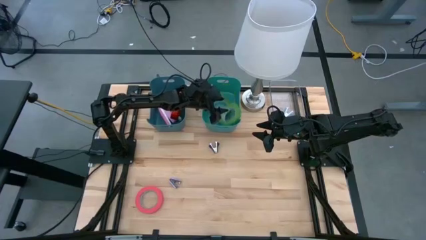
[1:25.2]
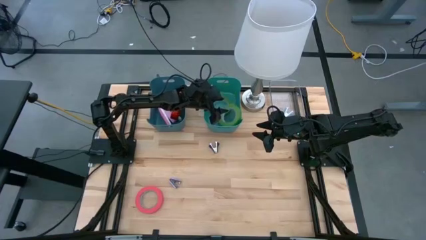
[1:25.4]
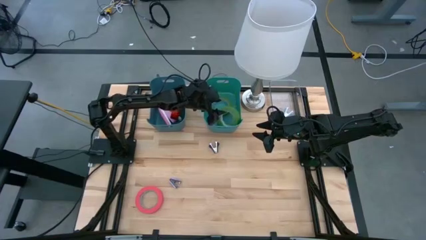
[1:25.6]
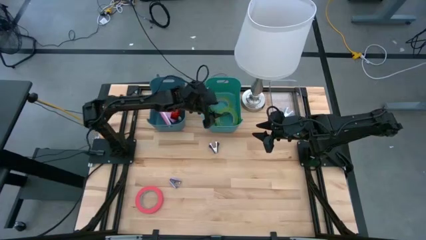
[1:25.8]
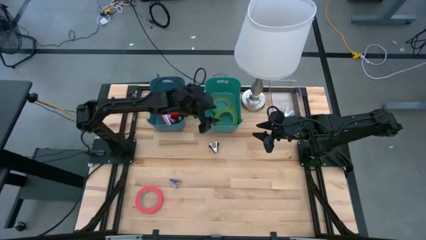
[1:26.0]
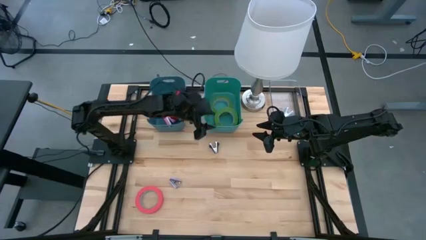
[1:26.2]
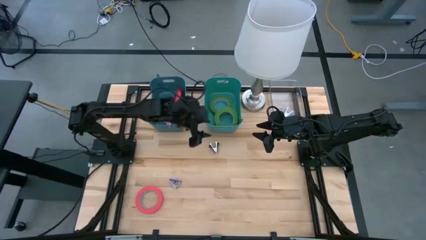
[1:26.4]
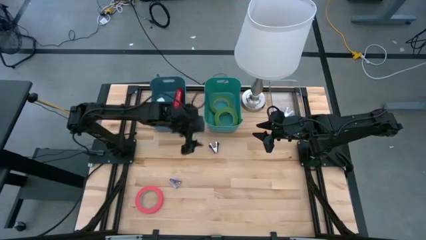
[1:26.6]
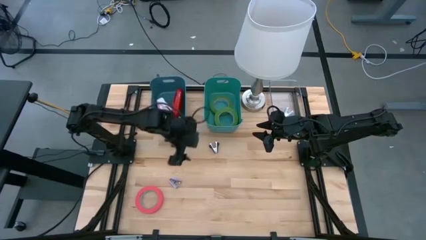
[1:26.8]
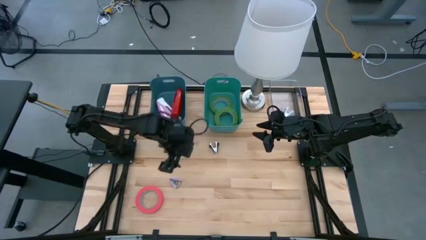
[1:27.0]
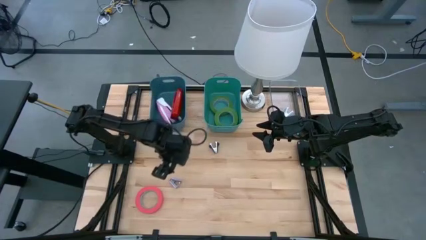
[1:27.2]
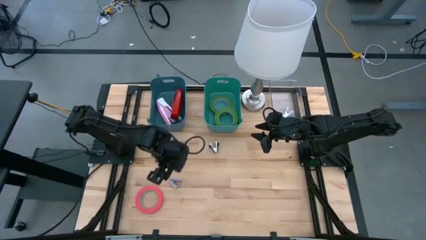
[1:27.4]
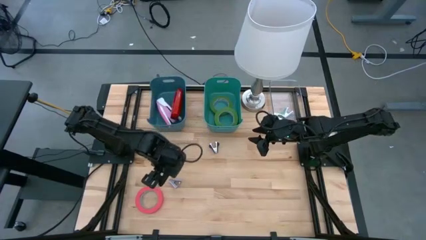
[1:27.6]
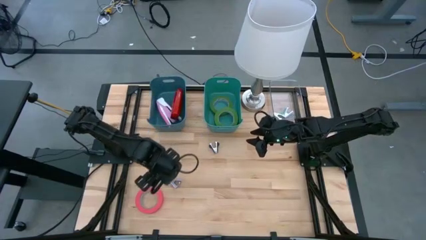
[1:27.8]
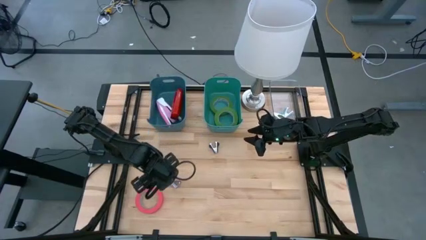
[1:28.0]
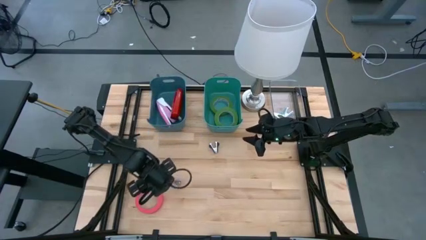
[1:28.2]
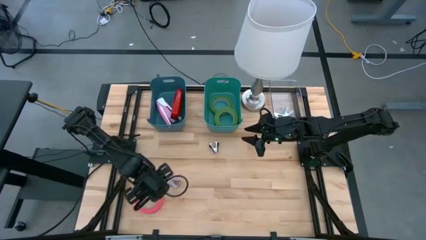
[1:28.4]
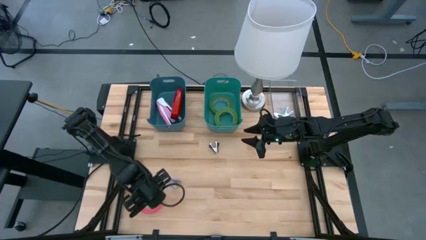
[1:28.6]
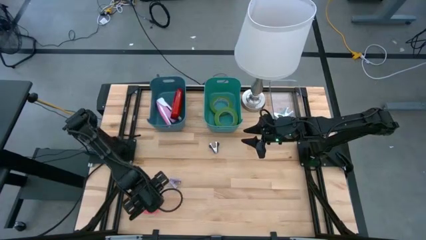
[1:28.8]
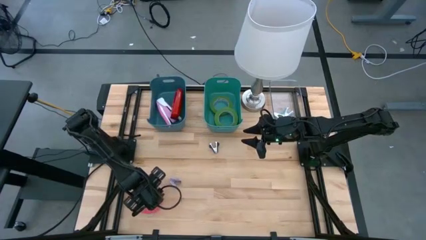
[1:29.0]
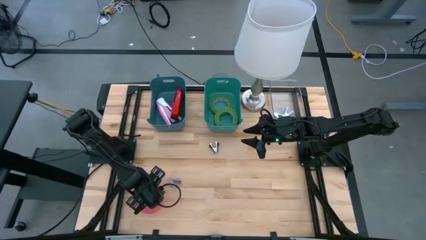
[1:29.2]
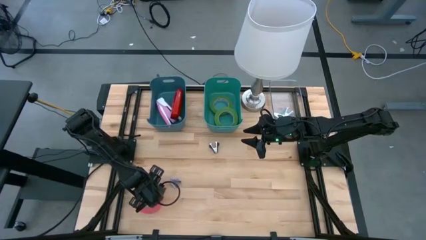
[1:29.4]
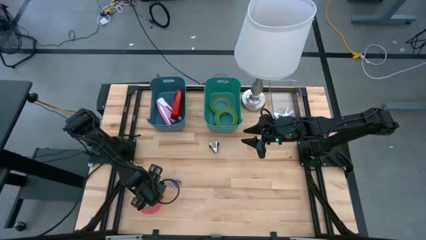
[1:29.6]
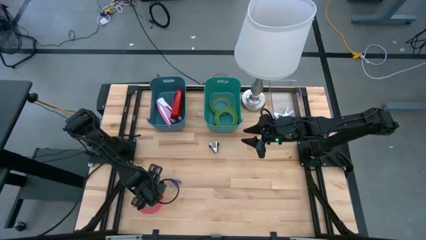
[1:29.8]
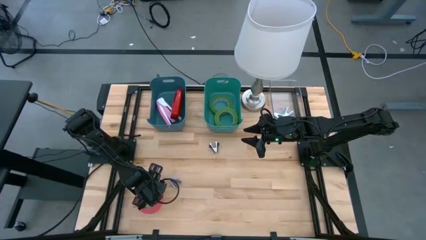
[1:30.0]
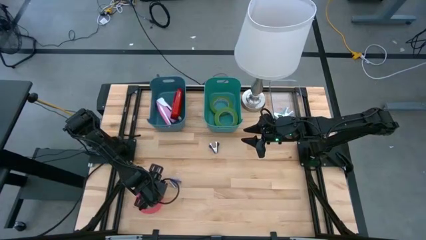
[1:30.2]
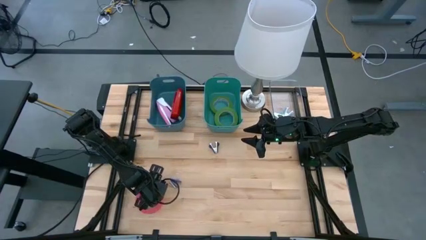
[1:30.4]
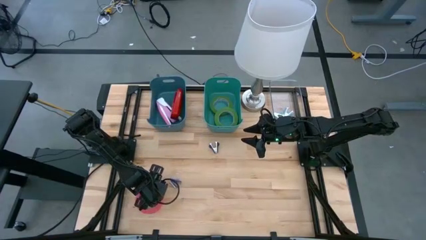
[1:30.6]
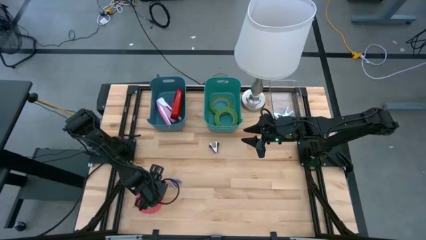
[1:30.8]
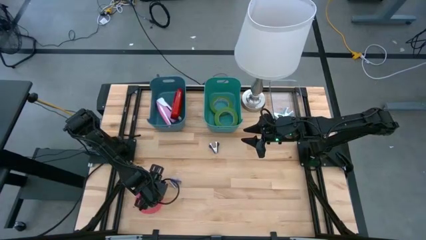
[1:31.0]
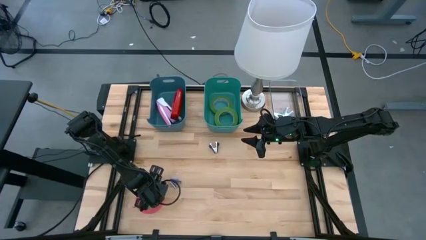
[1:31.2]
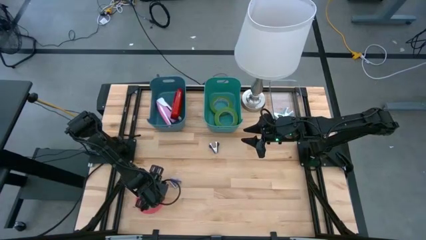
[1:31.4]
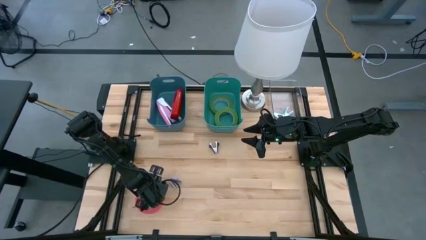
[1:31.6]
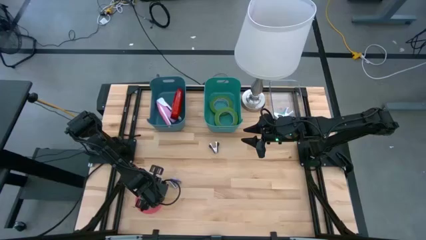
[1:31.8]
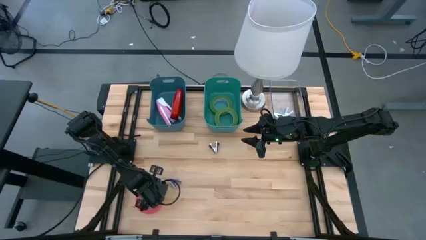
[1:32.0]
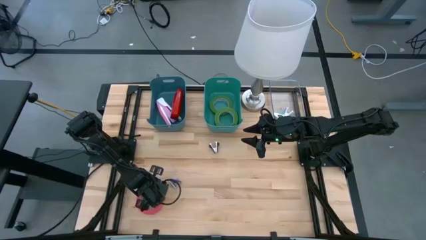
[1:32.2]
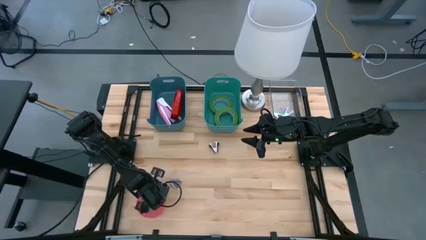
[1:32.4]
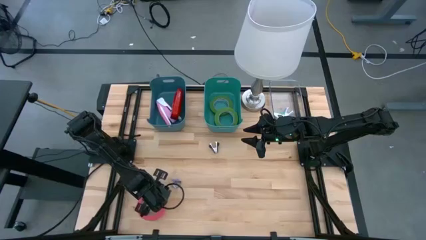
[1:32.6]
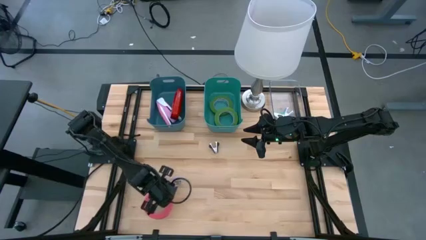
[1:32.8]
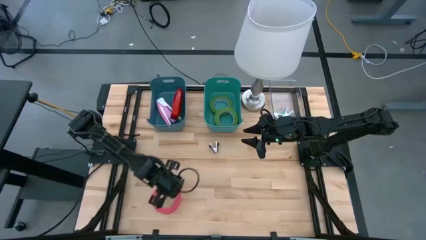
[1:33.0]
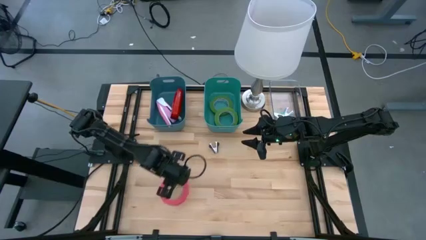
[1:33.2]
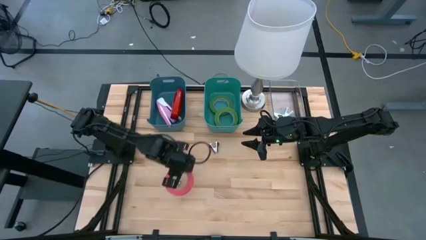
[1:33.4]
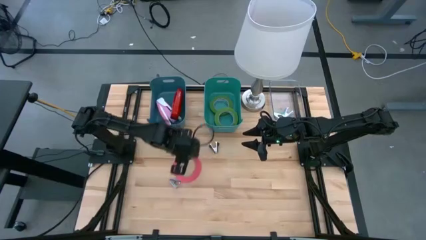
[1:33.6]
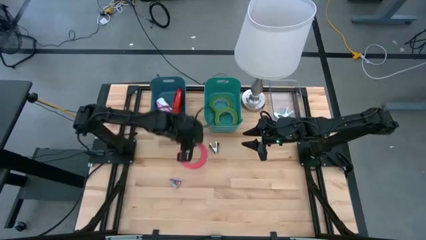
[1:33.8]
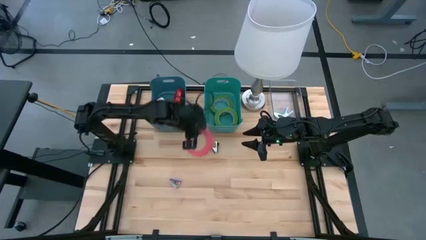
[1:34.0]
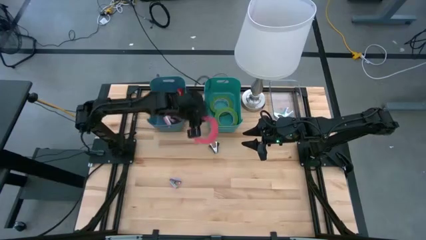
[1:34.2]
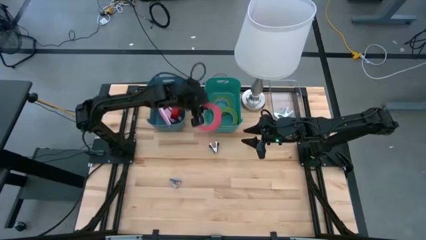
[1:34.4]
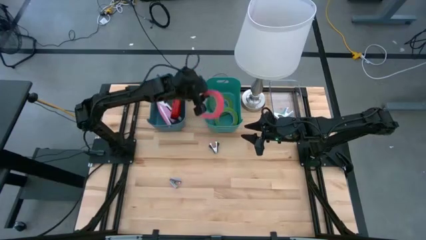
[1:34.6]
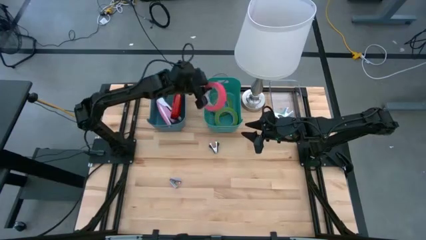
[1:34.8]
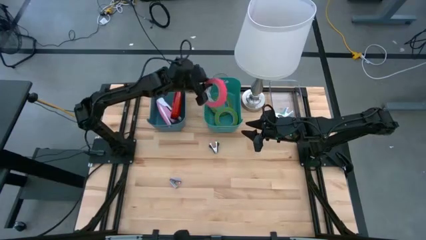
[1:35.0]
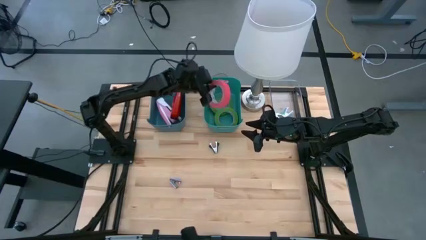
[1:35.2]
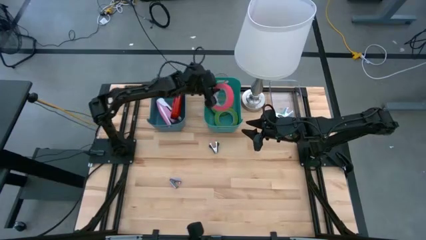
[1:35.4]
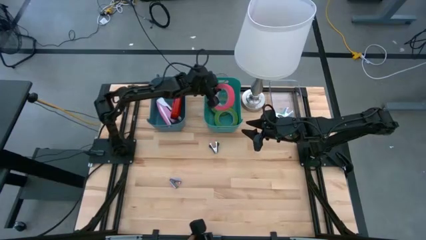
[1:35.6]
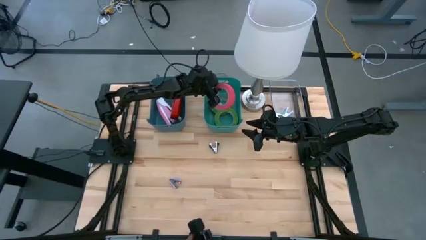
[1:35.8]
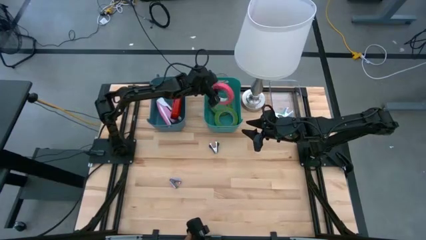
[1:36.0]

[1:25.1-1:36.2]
Task: Pick and place Stapler, Stapler remover, tape
Put the pink tape into the green bin
